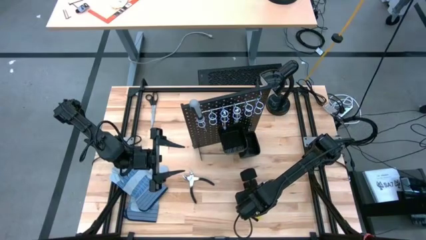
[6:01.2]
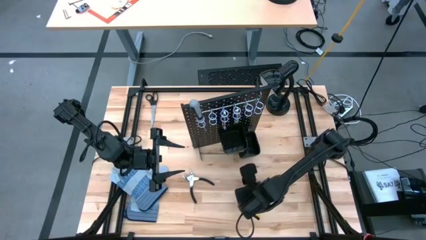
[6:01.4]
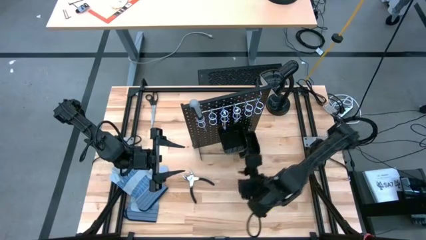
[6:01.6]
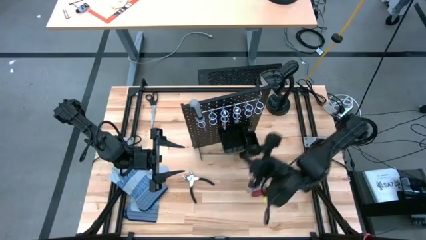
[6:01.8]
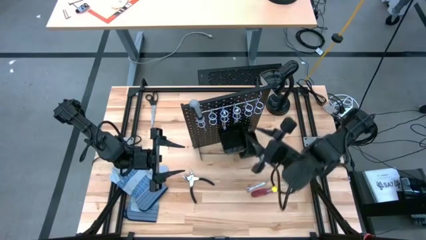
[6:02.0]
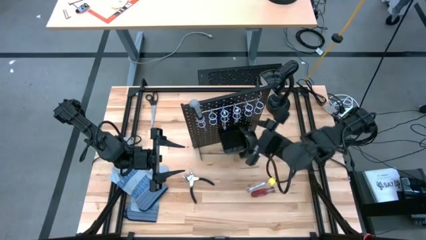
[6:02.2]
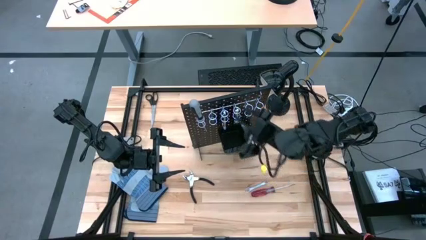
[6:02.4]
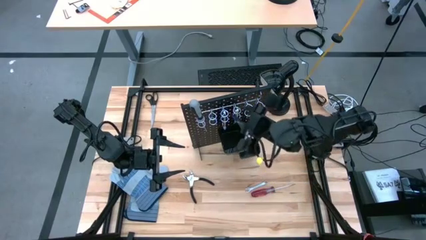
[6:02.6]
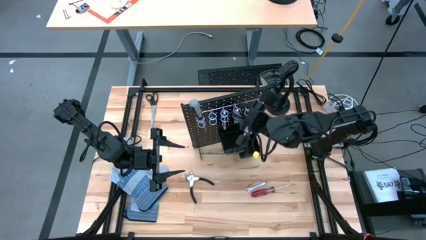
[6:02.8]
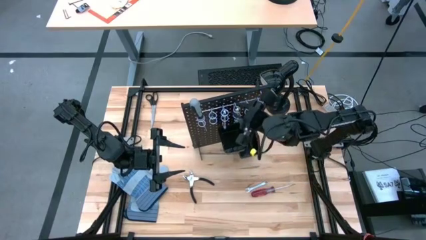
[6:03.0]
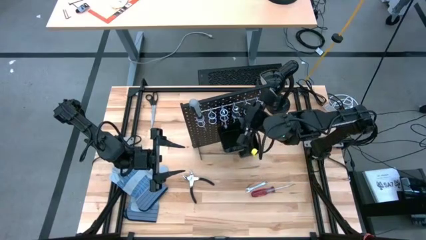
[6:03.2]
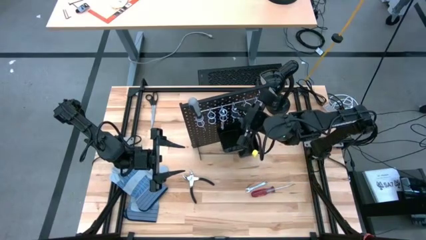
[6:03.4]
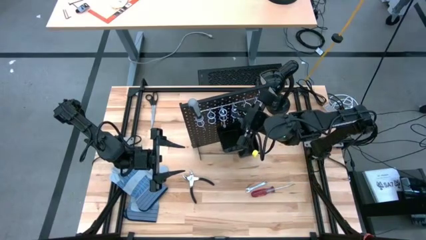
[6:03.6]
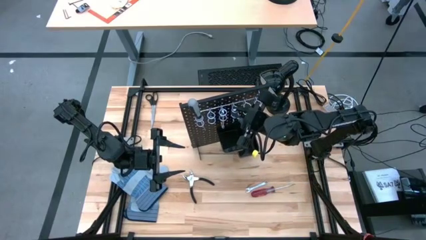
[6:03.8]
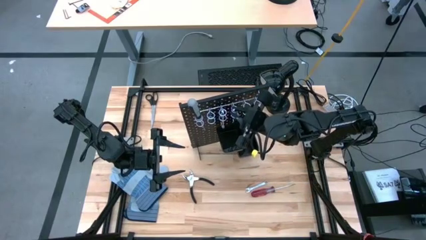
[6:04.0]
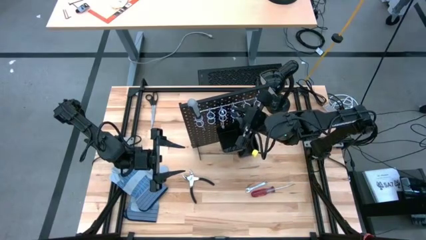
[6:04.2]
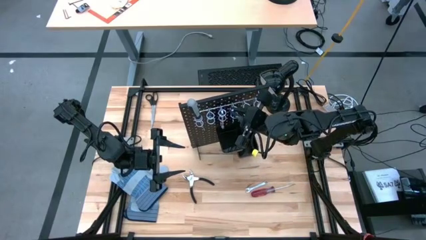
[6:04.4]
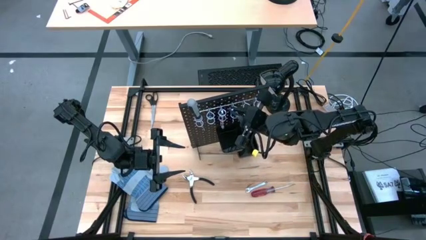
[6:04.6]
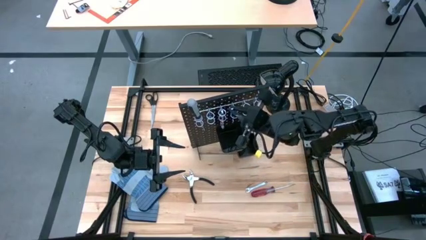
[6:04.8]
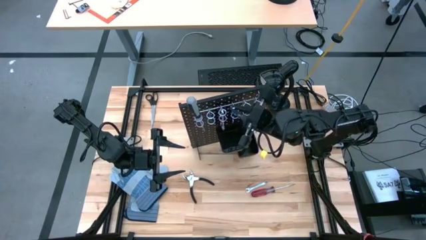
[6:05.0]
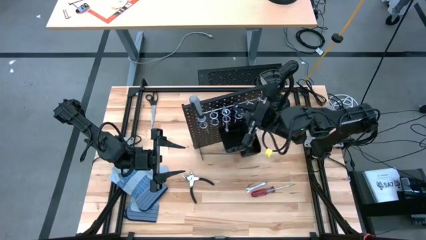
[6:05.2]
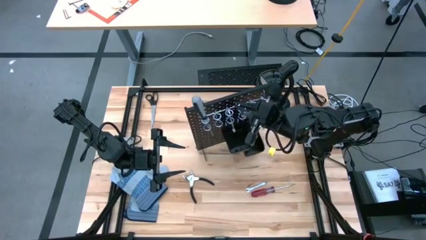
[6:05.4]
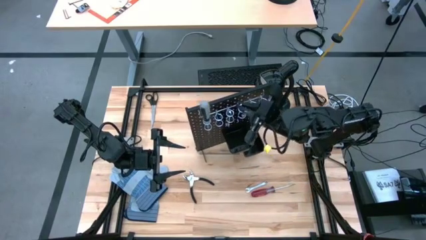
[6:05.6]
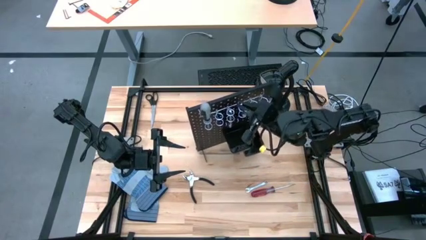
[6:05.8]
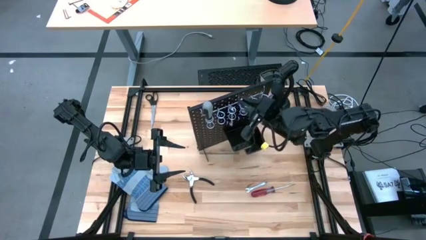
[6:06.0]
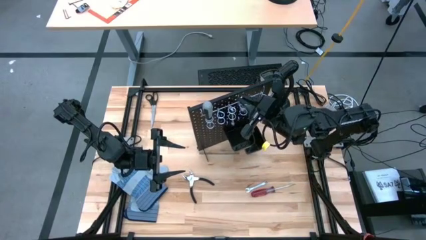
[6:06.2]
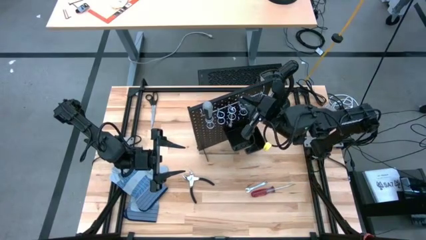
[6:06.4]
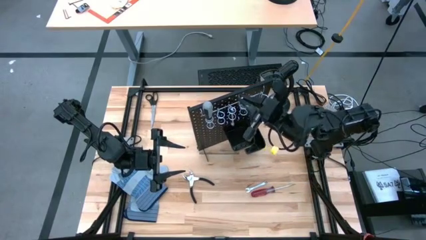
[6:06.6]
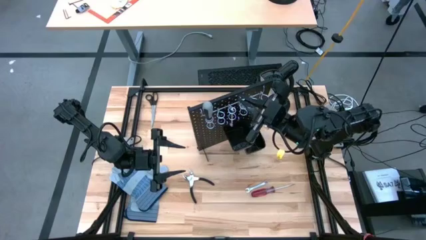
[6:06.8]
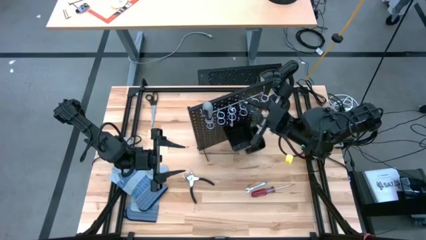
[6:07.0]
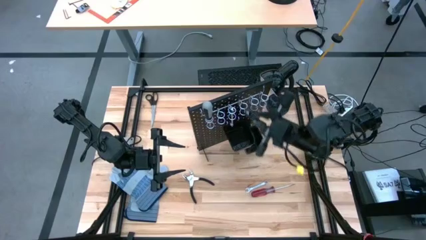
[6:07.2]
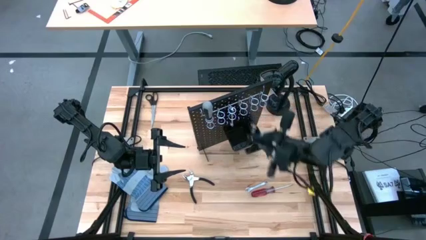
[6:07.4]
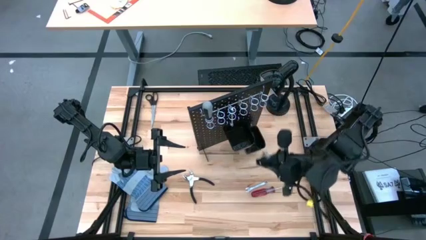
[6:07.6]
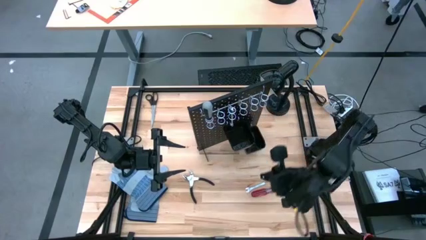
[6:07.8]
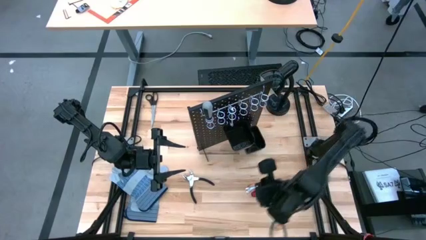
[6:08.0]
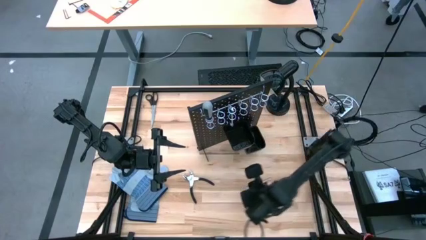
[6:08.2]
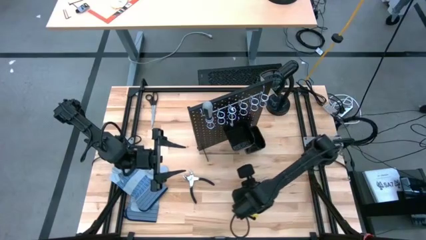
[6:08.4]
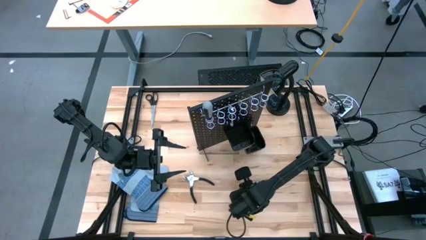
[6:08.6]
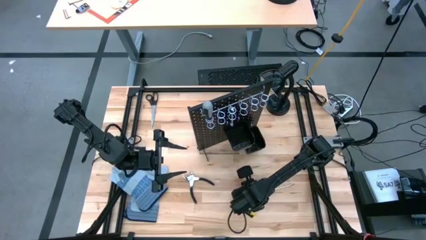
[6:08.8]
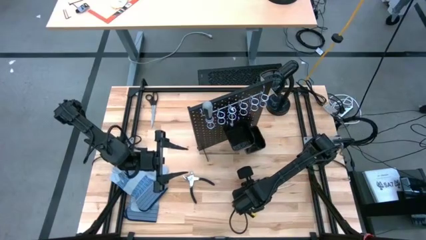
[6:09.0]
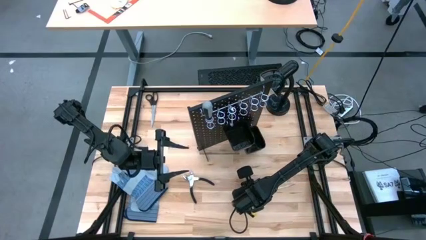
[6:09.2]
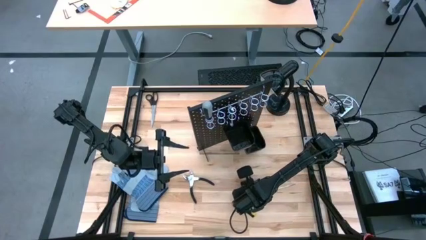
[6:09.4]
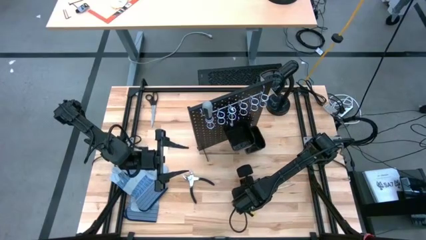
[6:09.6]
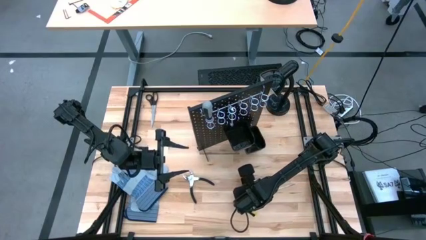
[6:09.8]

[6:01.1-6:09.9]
Task: Hang tools onto peg board
Unhang the silver wrench from the black peg board

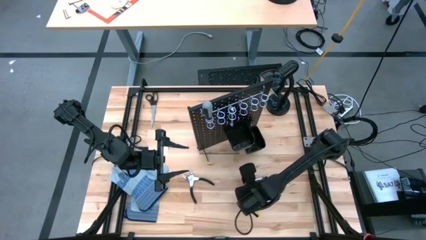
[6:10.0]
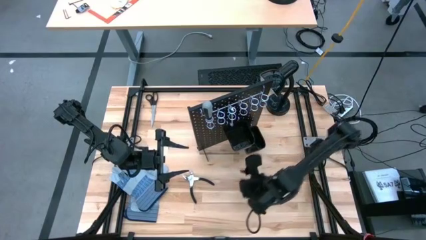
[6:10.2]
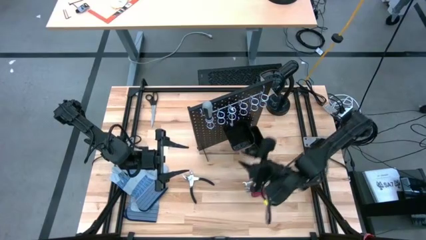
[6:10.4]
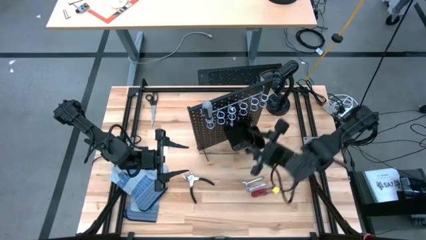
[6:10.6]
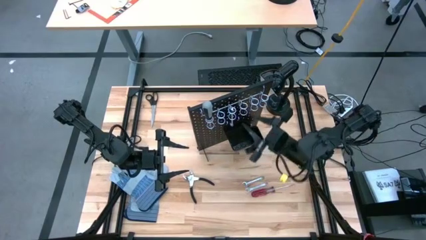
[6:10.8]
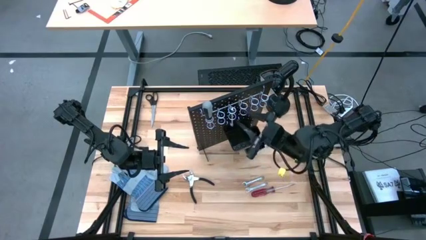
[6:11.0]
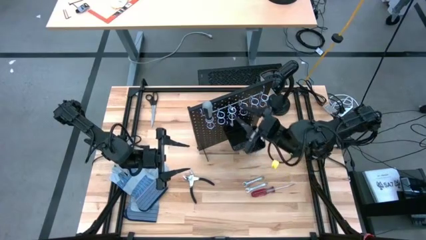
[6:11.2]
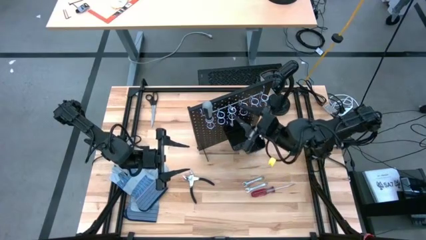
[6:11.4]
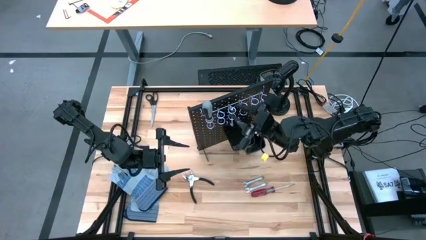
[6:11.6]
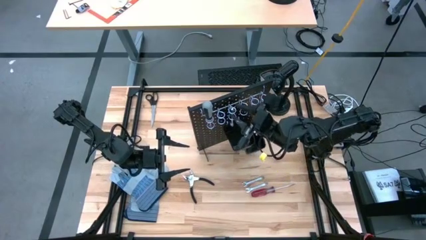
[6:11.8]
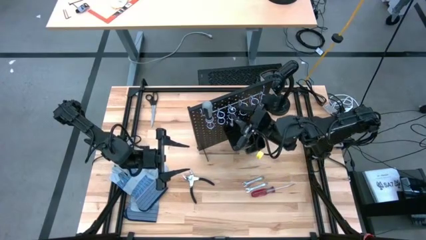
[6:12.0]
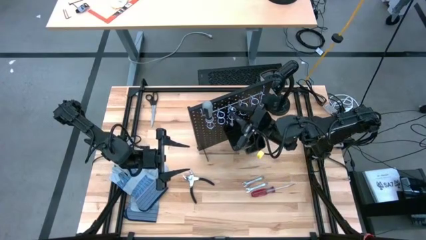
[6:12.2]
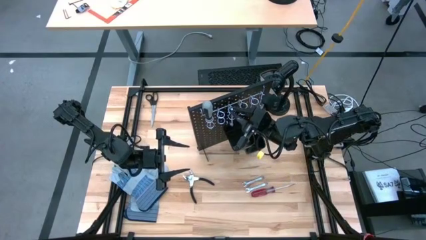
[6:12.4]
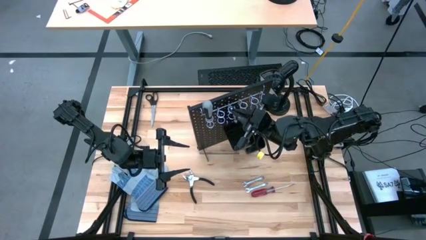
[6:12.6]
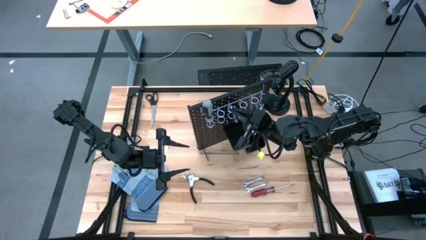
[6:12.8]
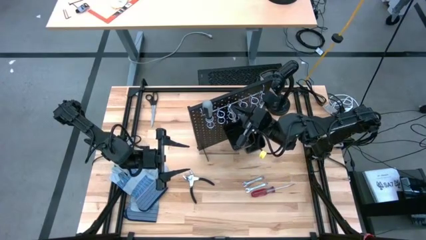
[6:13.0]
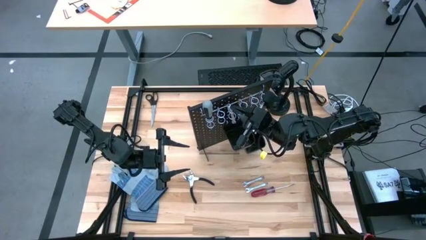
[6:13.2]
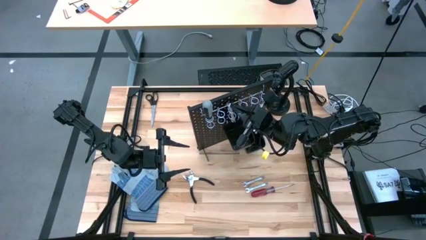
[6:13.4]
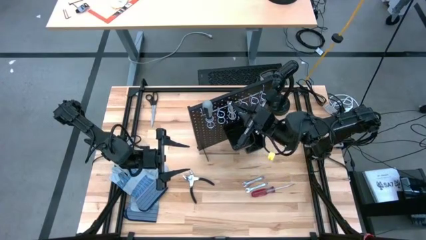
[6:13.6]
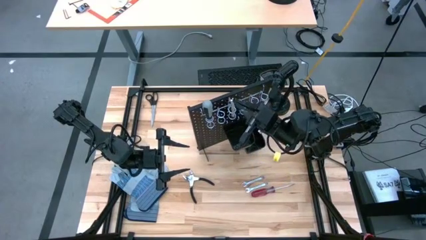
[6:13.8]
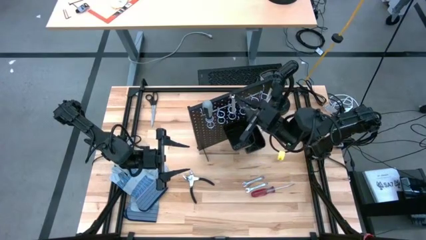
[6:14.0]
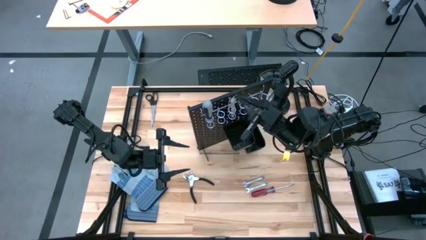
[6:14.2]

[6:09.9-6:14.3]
Unhang the silver wrench from the black peg board

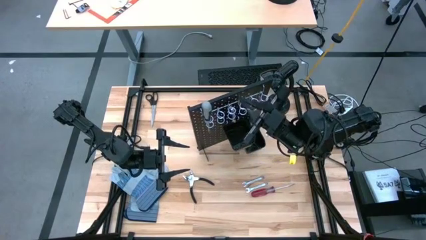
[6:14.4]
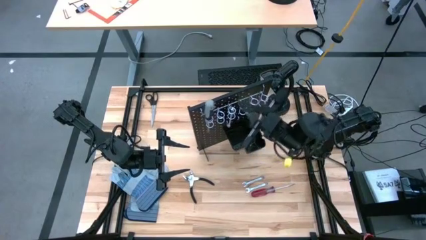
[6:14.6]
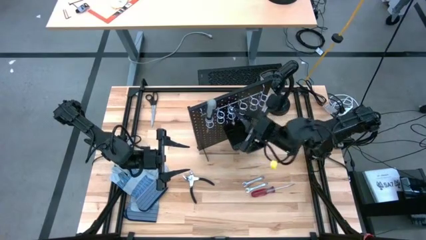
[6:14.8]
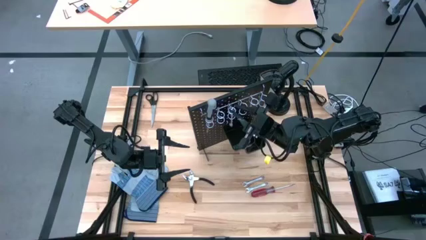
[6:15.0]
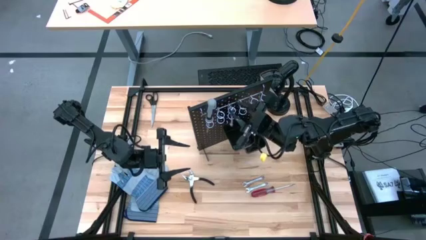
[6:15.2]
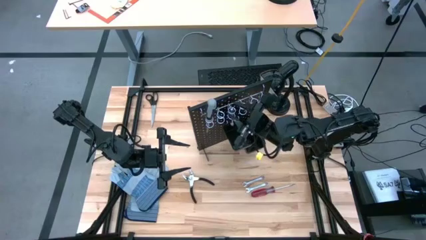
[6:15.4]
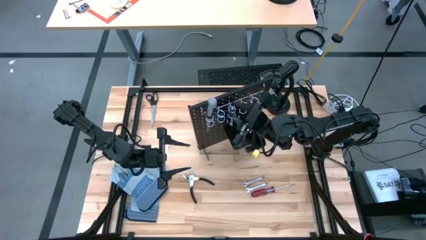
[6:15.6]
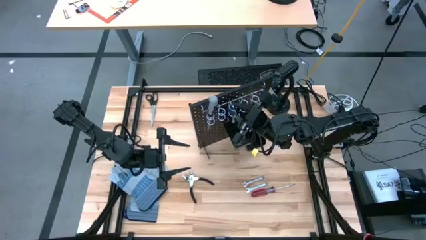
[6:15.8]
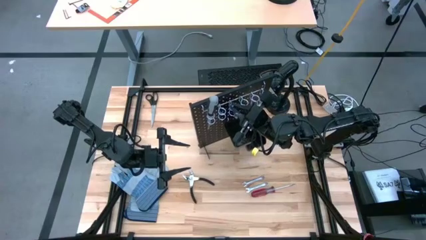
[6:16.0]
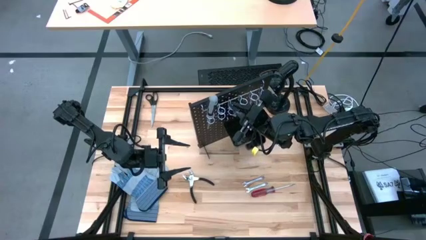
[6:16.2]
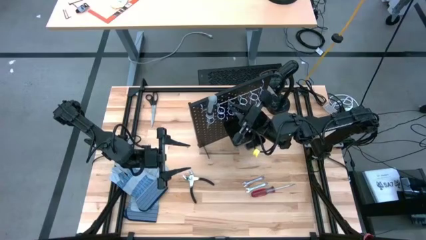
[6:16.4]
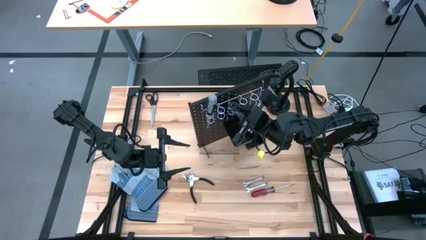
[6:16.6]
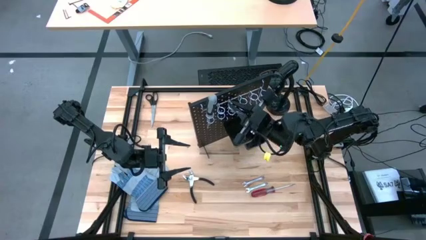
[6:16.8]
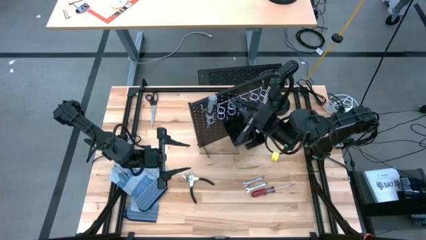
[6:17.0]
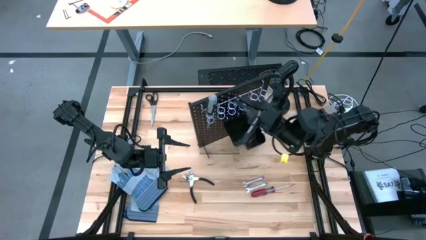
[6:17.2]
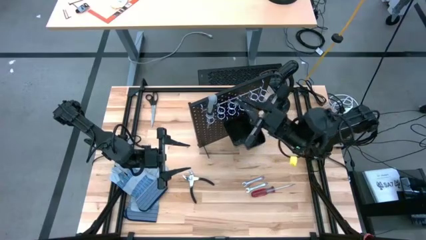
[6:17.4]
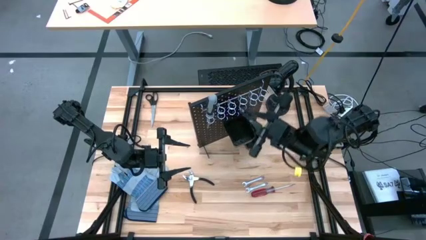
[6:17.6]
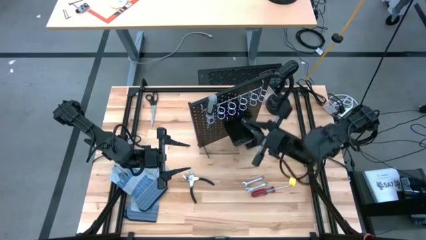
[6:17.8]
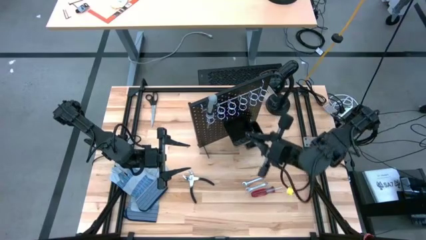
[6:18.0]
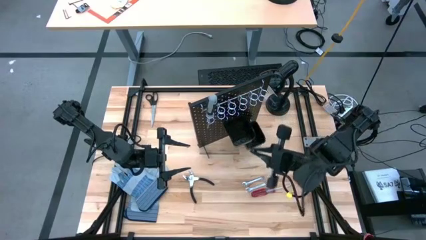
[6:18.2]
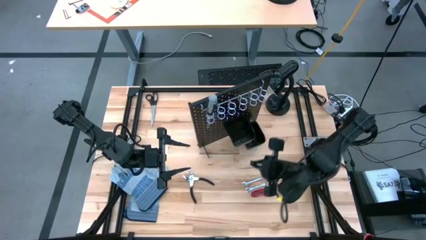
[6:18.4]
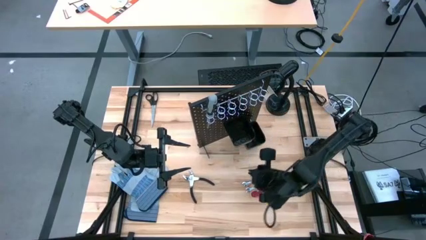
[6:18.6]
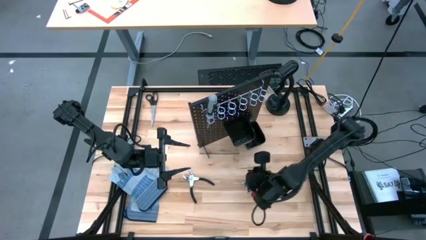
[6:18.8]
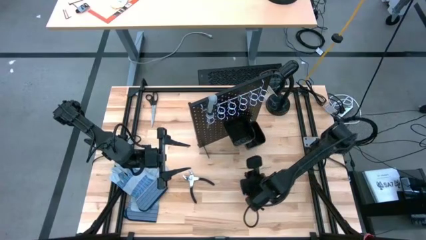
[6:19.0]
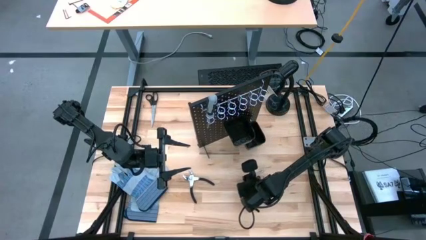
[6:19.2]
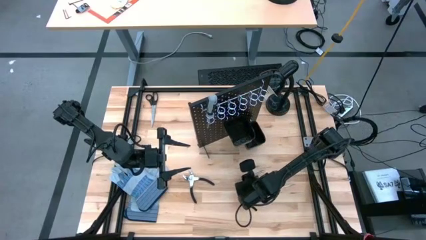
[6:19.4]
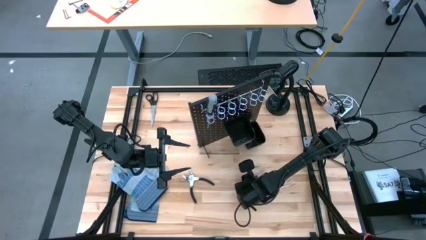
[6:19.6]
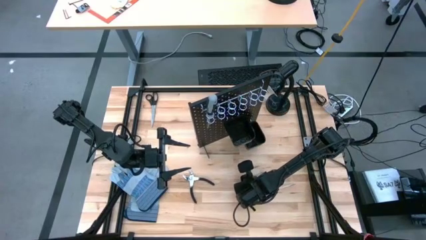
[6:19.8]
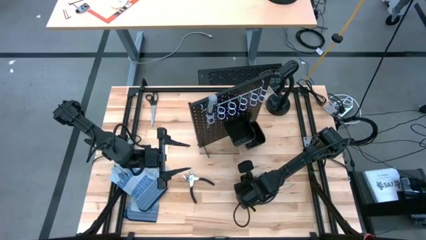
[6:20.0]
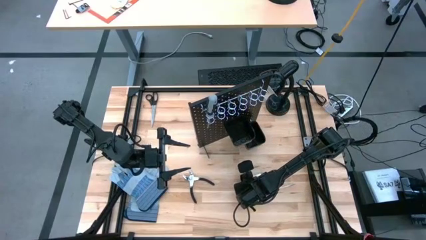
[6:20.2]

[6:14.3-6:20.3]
Unhang the silver wrench from the black peg board
